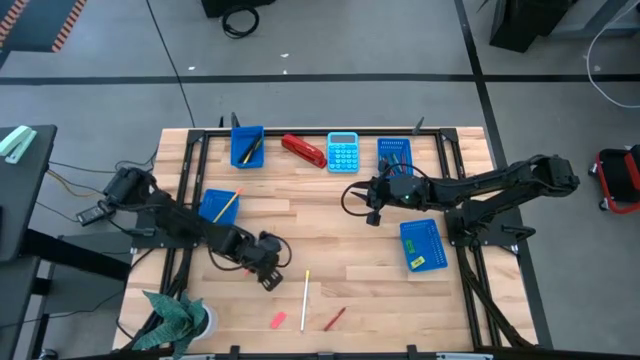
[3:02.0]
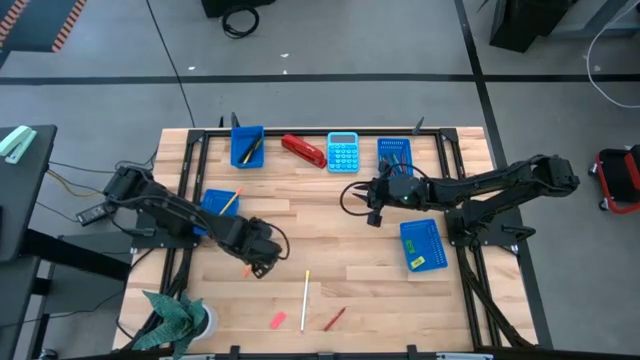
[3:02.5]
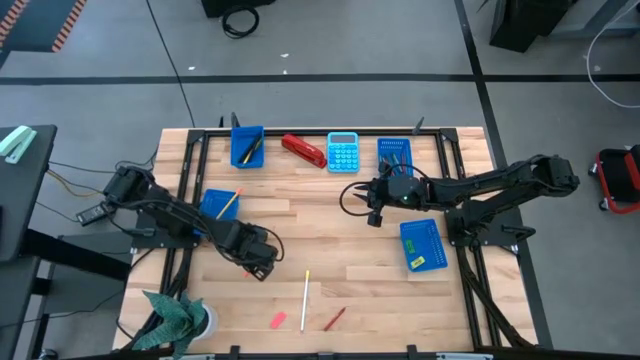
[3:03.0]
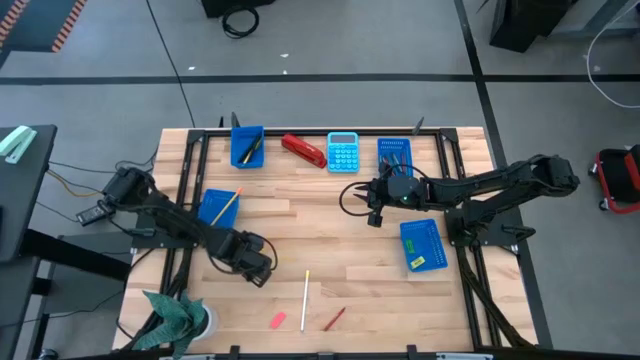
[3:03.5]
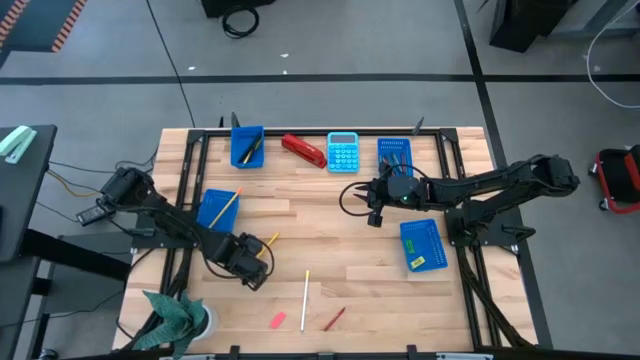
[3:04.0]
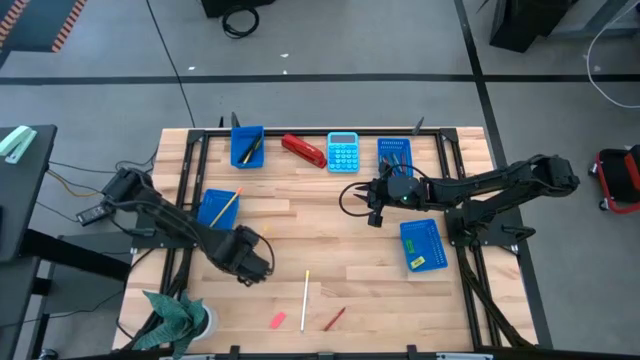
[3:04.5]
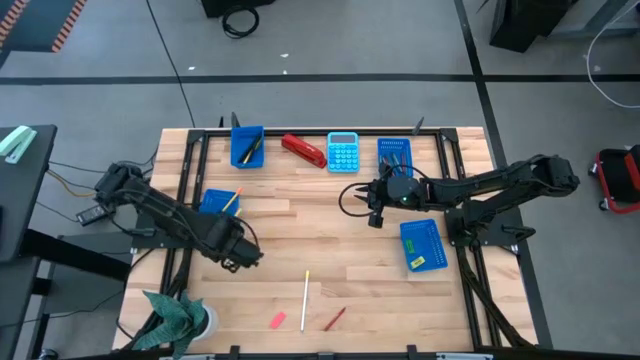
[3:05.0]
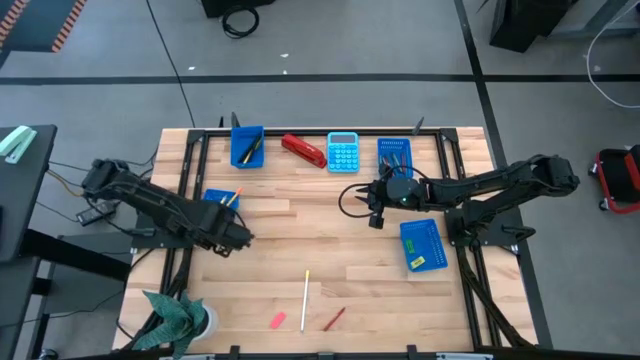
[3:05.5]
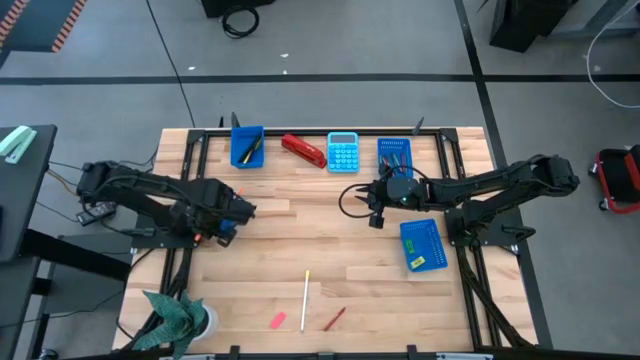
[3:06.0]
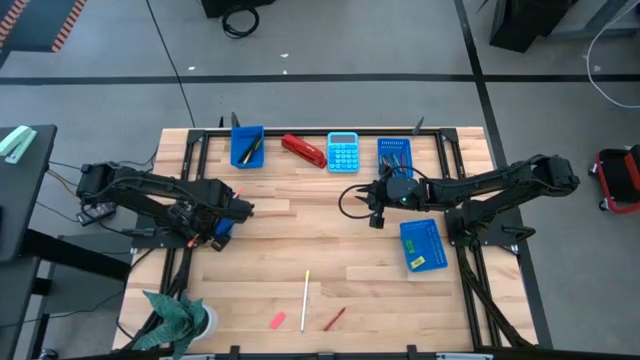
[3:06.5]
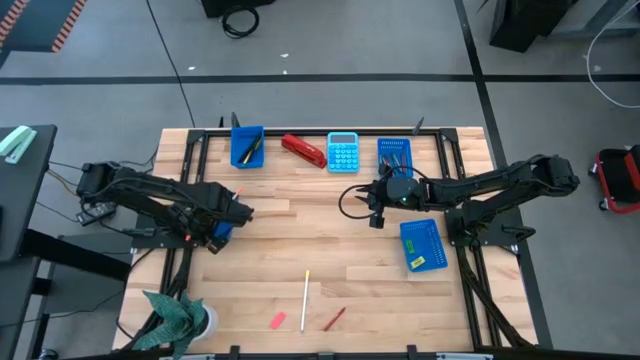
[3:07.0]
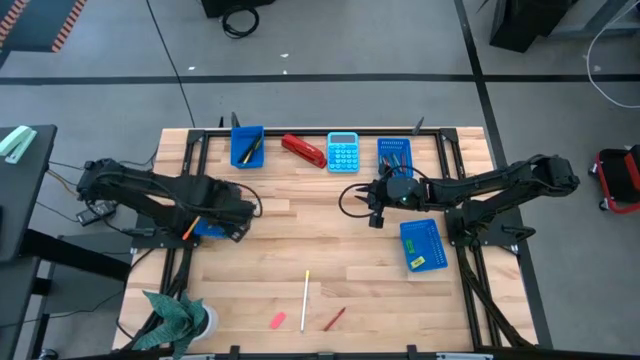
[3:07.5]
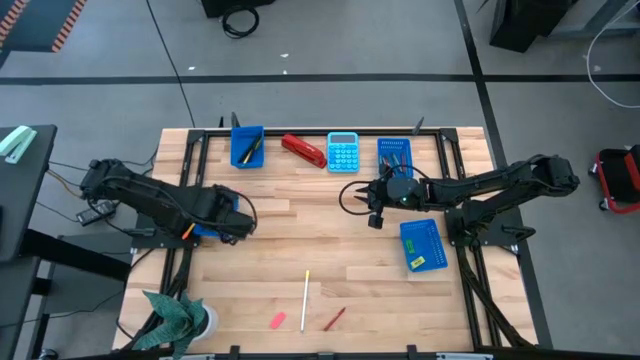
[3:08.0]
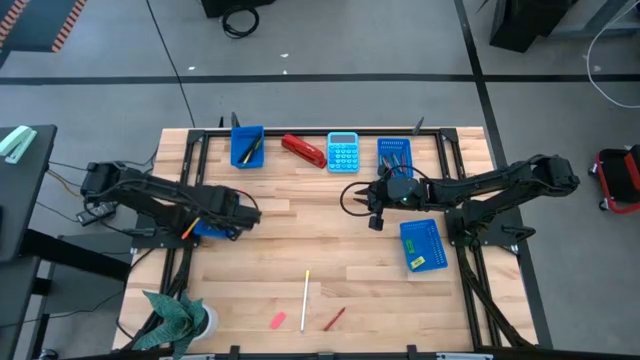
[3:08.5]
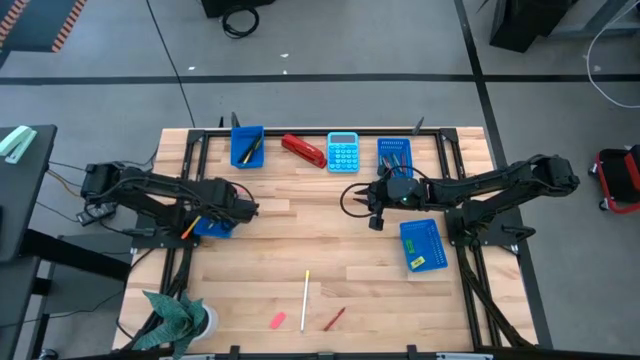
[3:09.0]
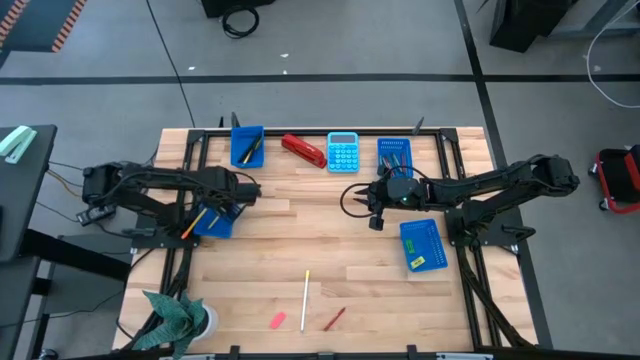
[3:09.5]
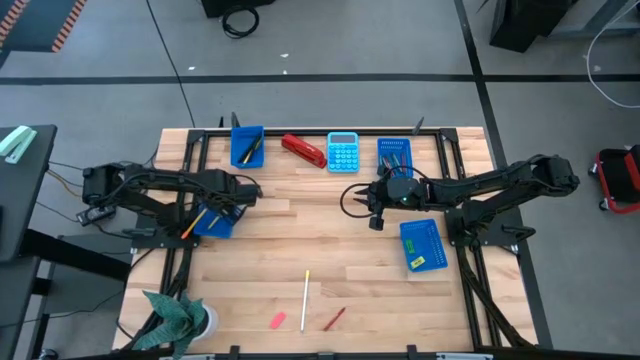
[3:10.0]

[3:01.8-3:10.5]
Task: Sort crayons/erasers/pens/pencils in bins
Put the yellow colored pencil into the bottom left bin

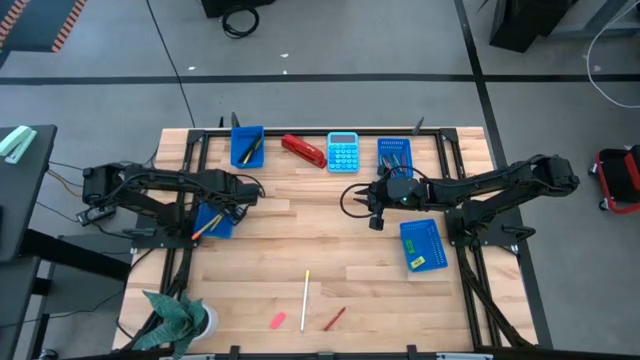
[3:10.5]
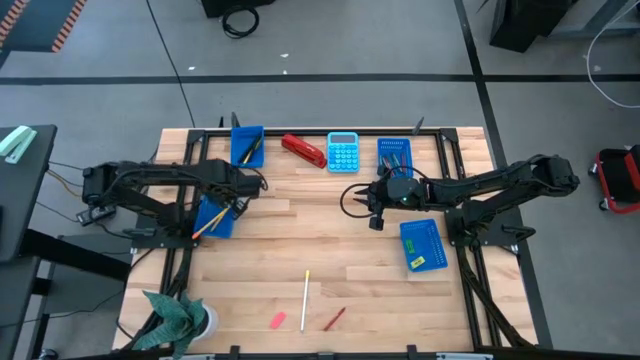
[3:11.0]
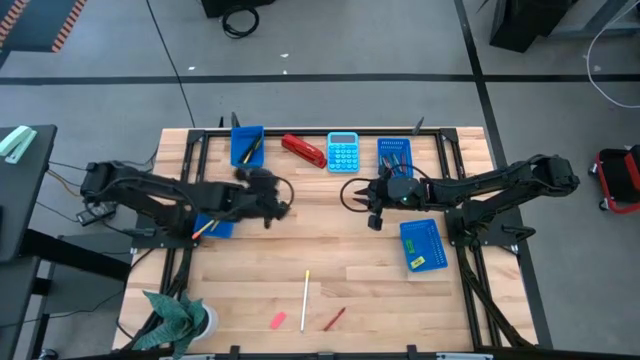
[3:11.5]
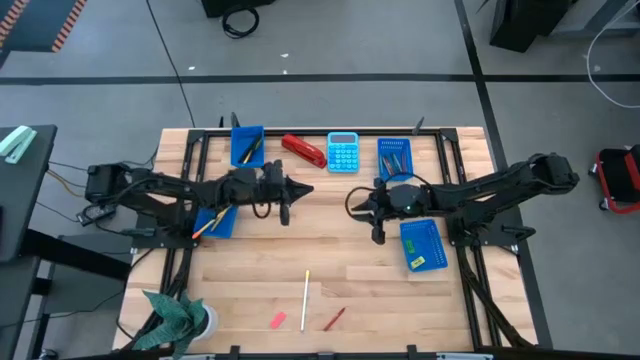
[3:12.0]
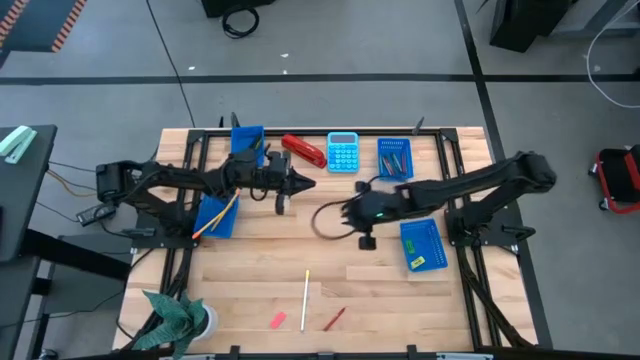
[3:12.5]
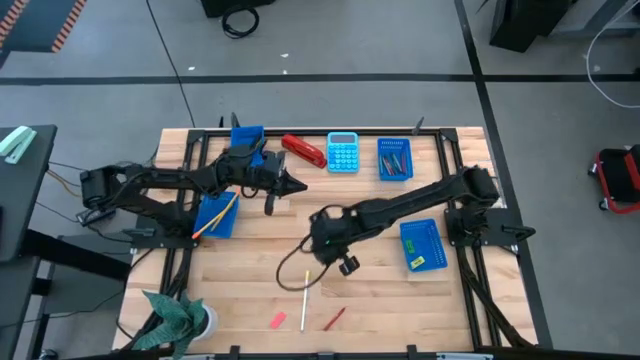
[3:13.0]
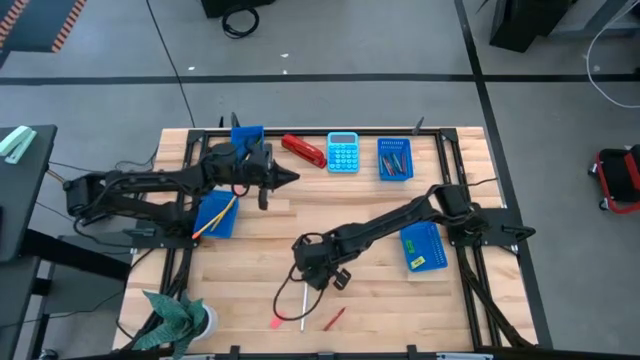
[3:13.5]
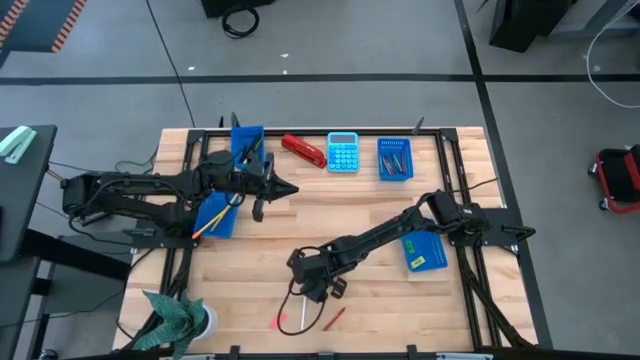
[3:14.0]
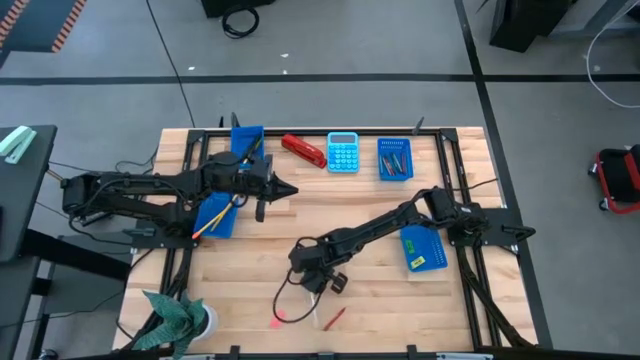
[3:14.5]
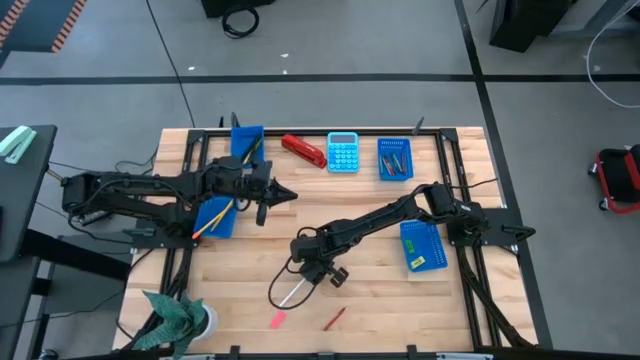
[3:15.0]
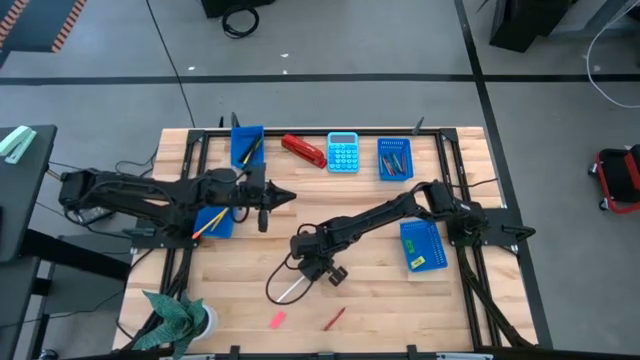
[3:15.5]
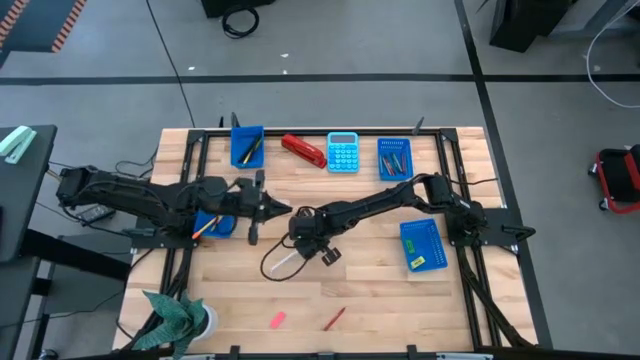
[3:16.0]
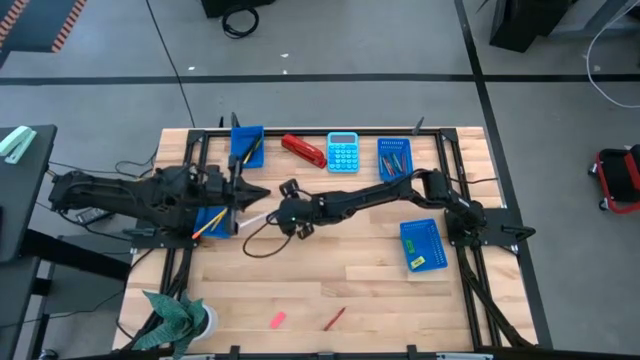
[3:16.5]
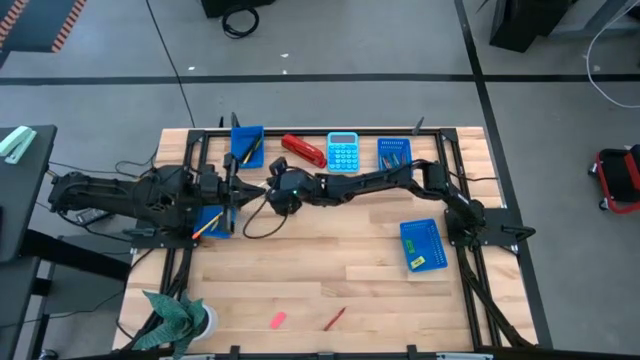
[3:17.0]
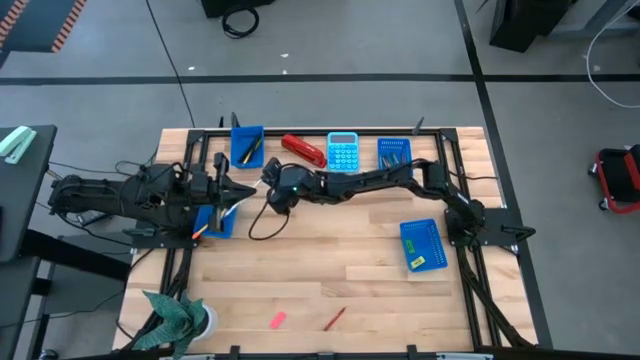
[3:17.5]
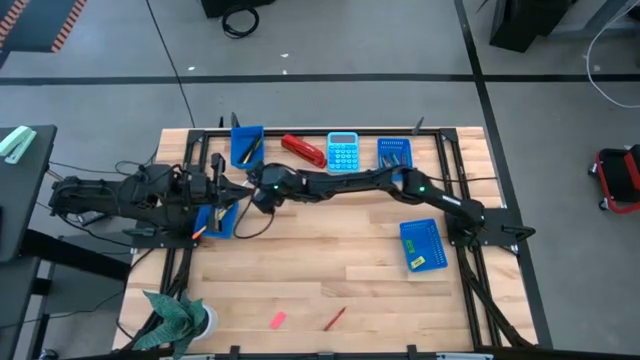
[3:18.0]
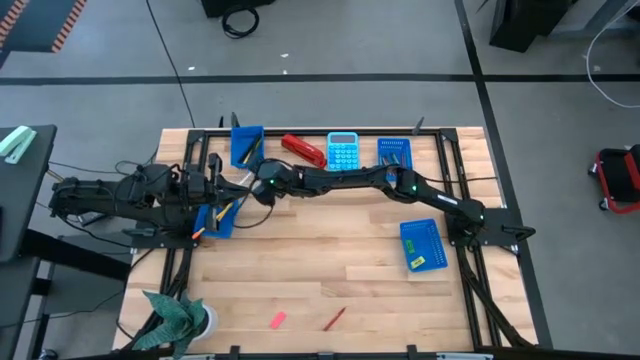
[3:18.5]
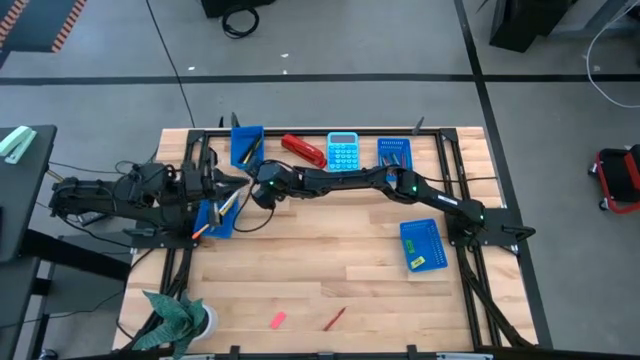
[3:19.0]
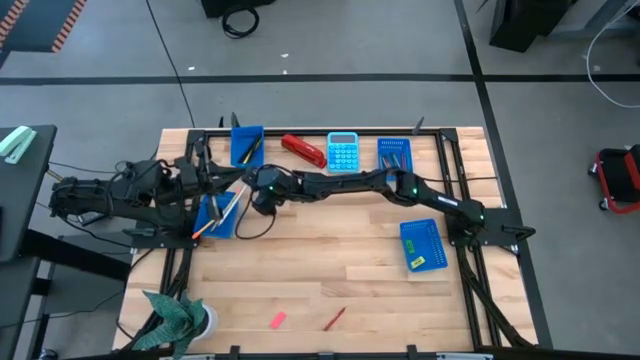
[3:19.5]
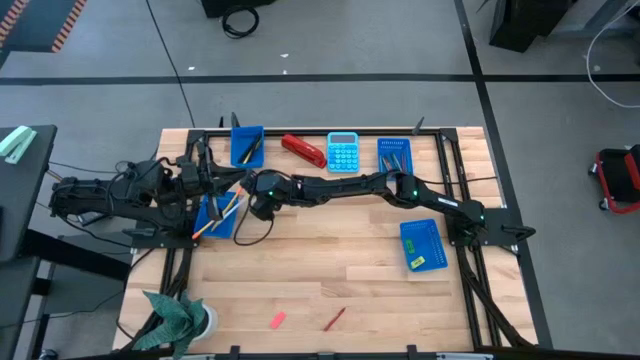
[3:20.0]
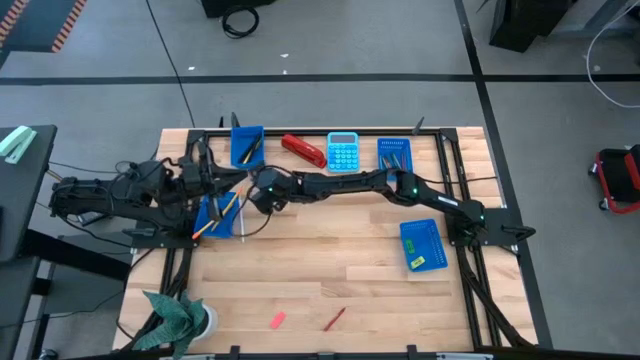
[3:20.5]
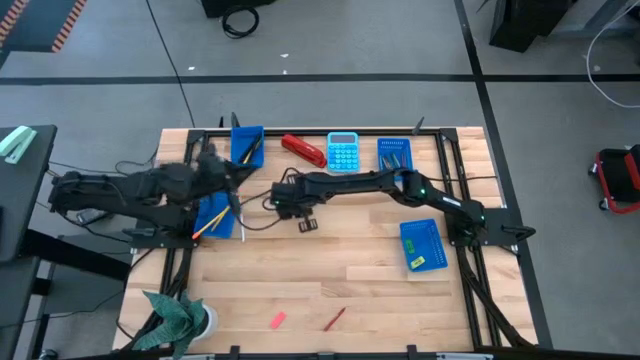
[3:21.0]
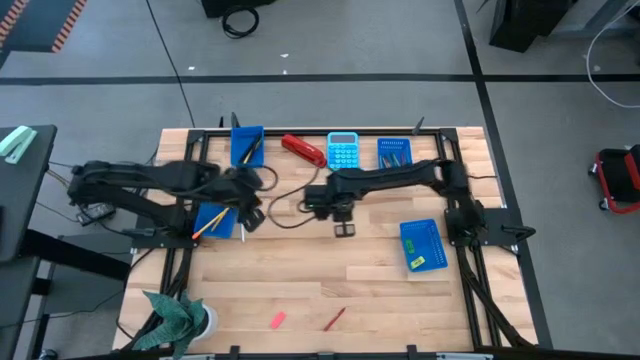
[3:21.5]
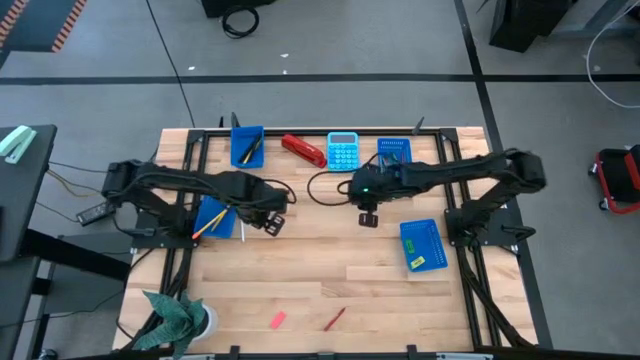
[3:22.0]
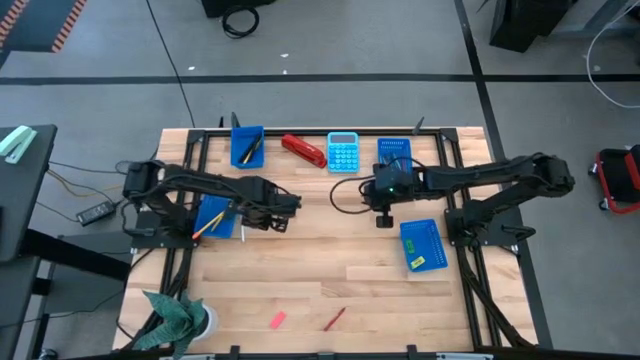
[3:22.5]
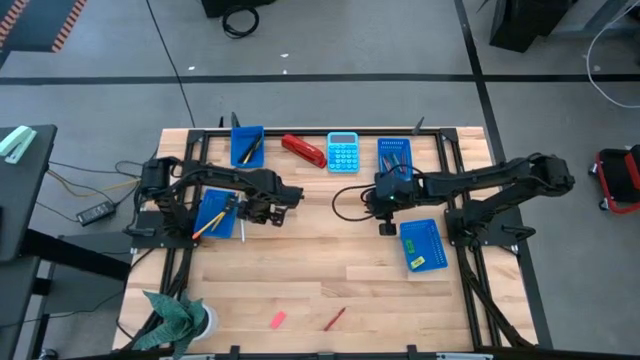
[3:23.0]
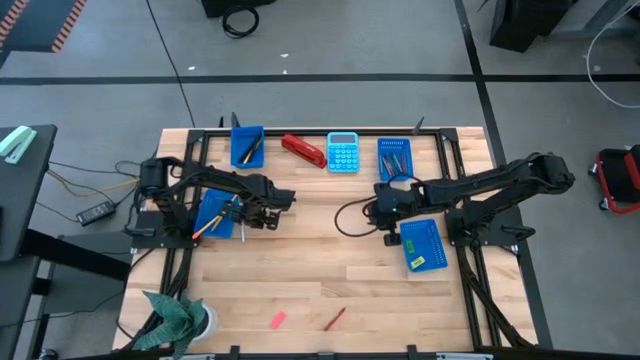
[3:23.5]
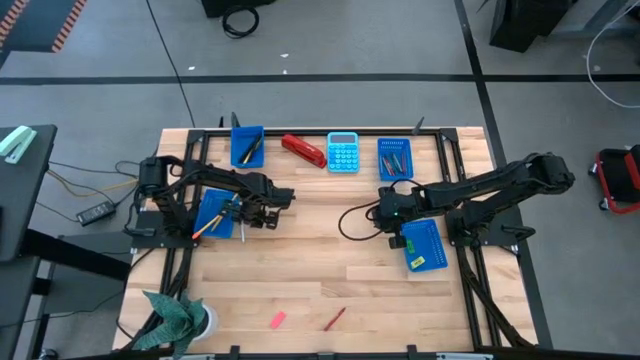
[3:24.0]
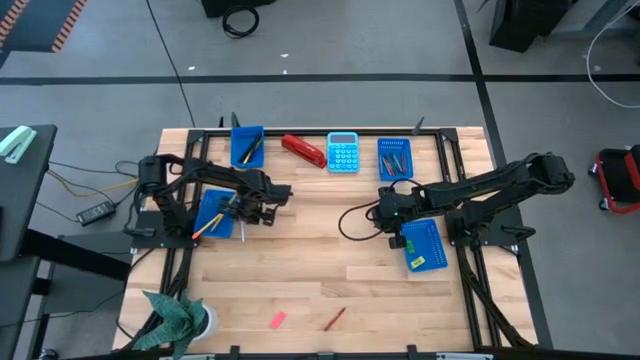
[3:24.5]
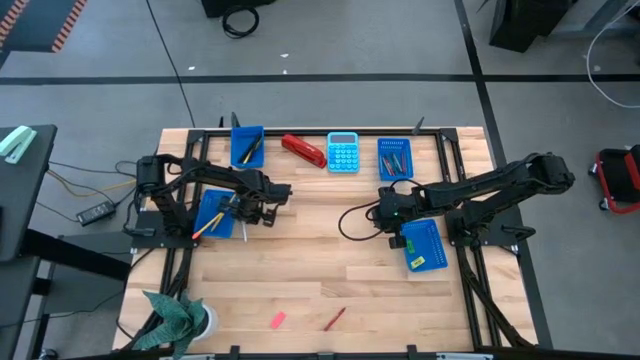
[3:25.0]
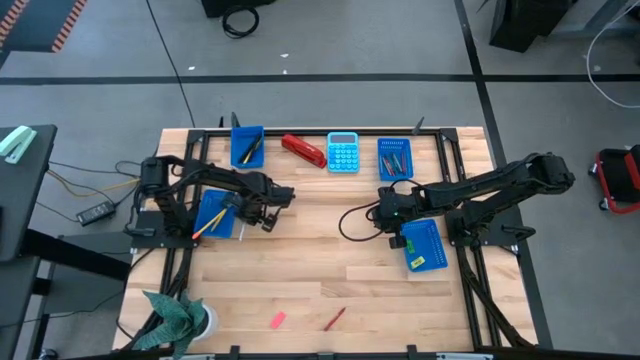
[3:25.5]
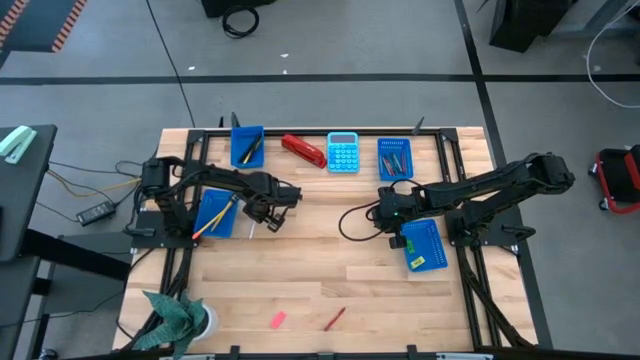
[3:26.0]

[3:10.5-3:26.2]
Put the white colored pencil into the middle left bin
